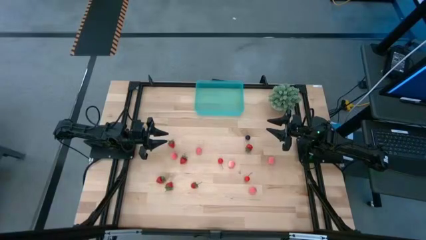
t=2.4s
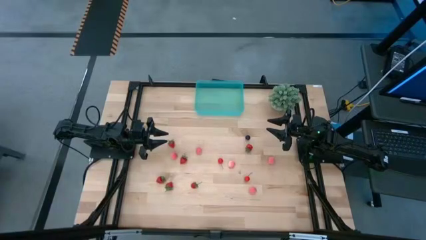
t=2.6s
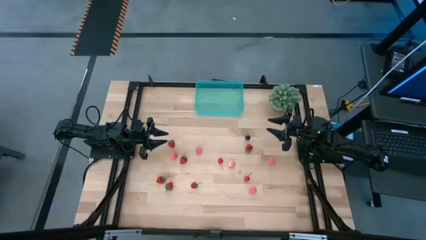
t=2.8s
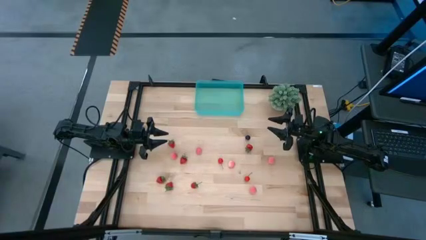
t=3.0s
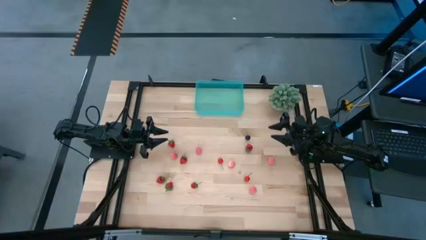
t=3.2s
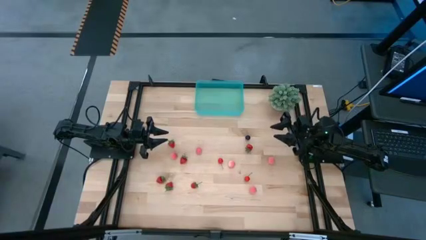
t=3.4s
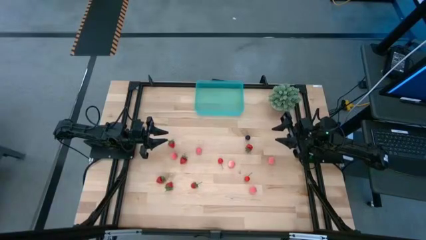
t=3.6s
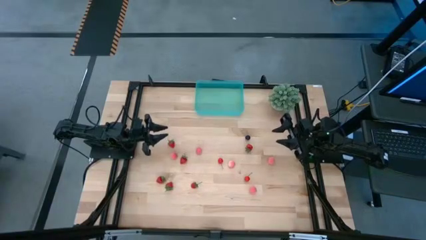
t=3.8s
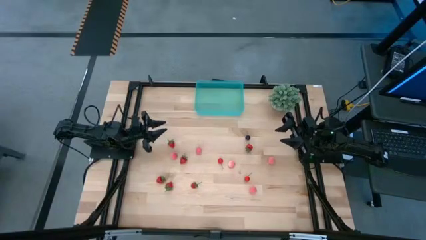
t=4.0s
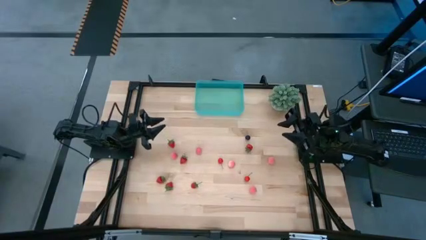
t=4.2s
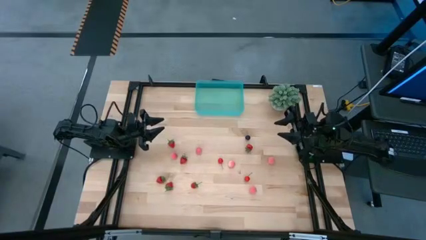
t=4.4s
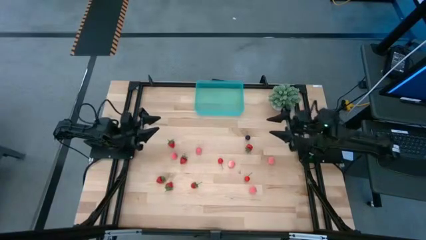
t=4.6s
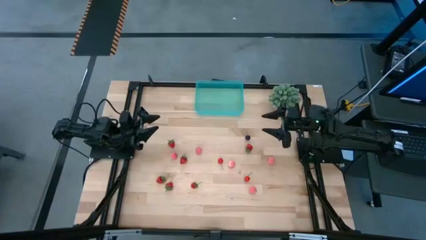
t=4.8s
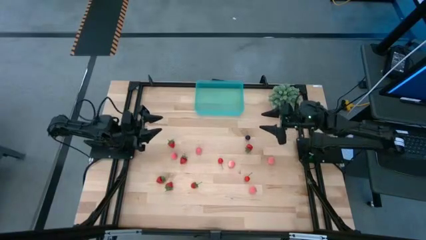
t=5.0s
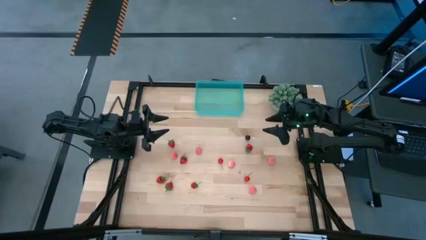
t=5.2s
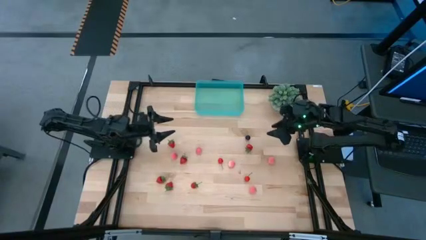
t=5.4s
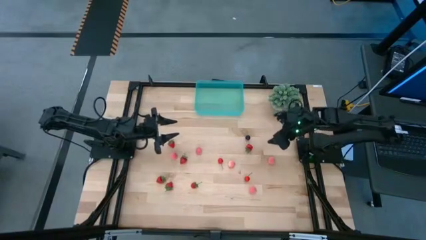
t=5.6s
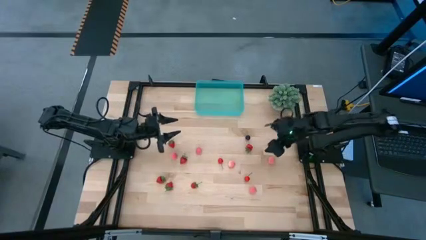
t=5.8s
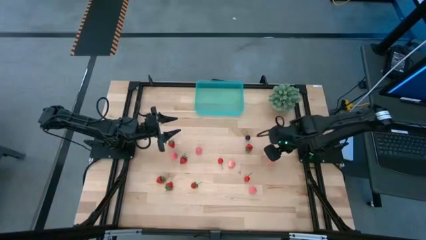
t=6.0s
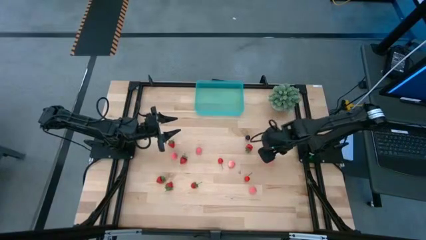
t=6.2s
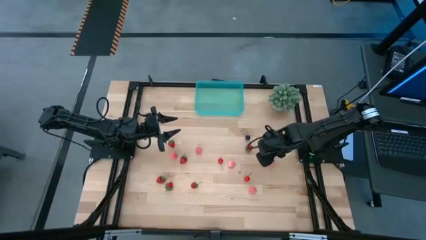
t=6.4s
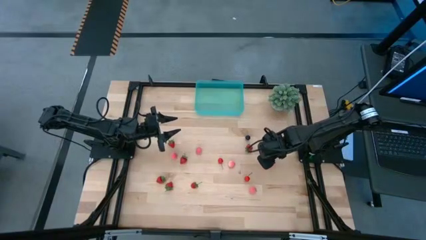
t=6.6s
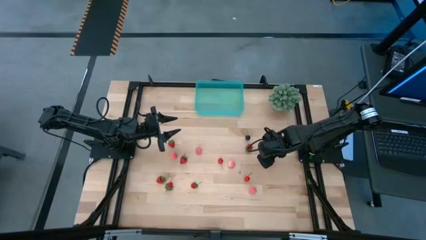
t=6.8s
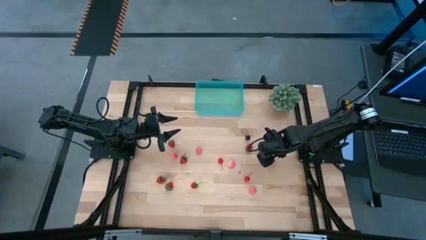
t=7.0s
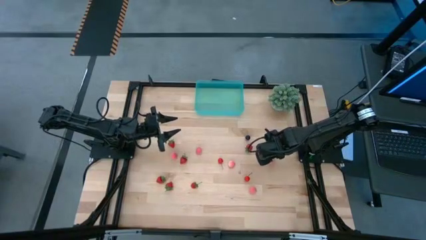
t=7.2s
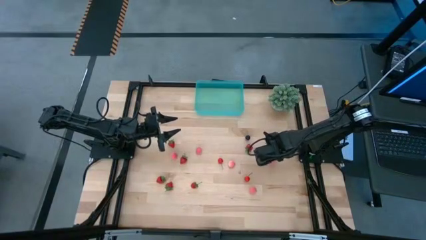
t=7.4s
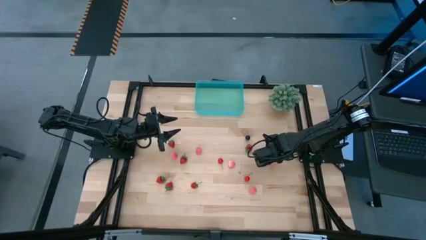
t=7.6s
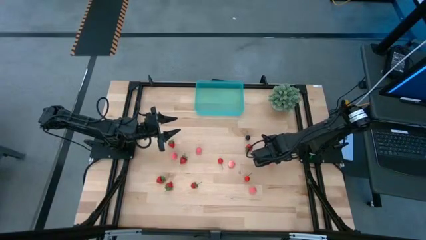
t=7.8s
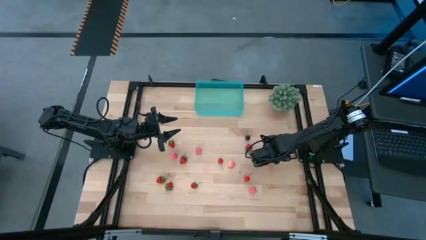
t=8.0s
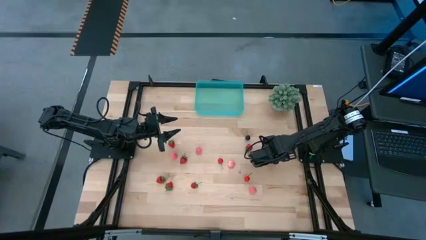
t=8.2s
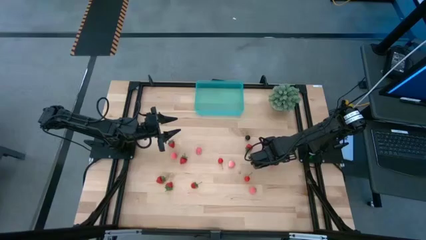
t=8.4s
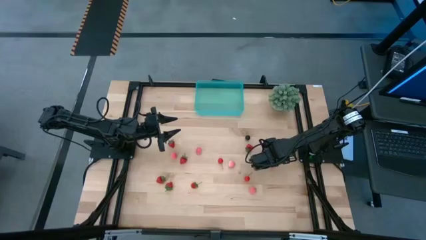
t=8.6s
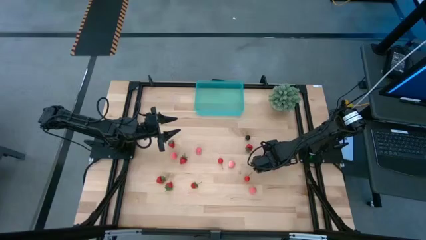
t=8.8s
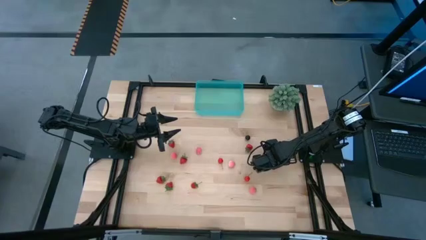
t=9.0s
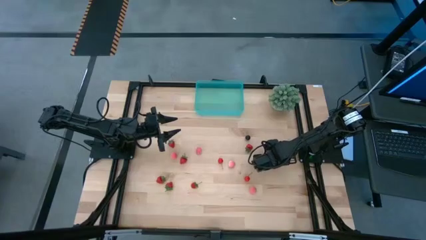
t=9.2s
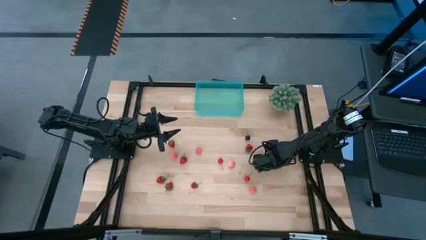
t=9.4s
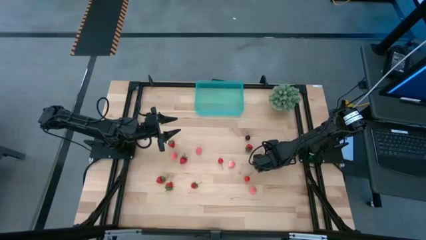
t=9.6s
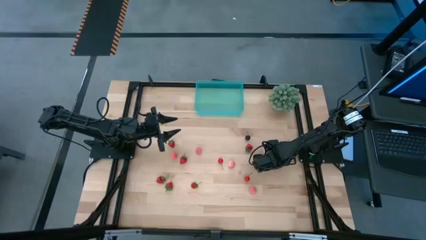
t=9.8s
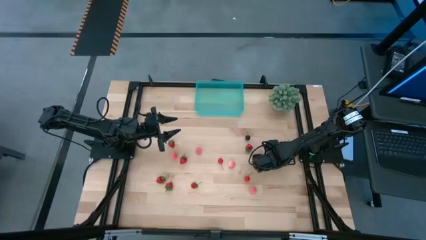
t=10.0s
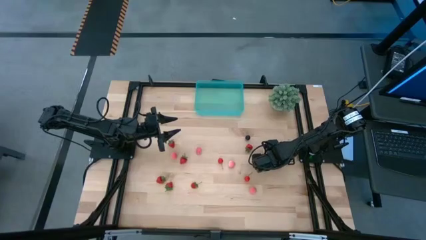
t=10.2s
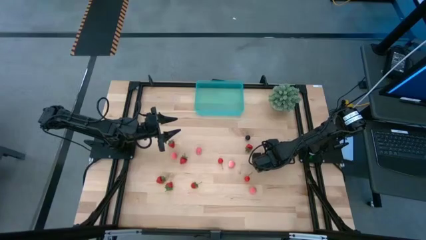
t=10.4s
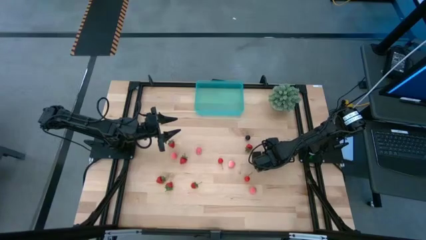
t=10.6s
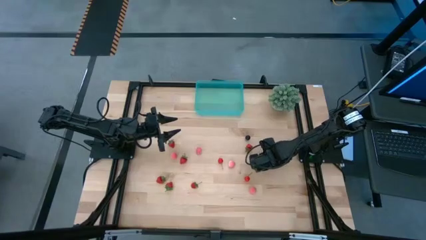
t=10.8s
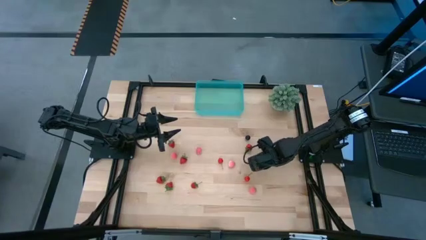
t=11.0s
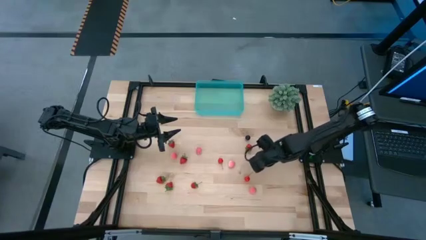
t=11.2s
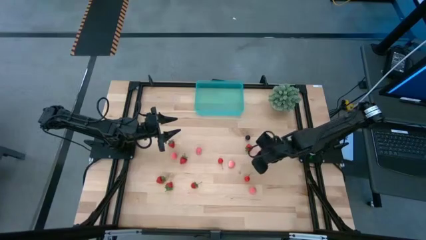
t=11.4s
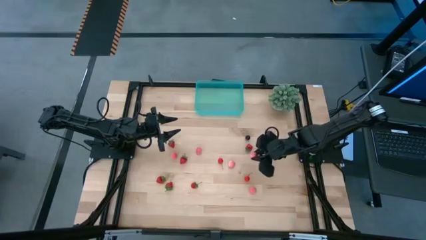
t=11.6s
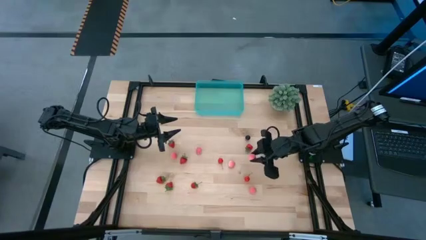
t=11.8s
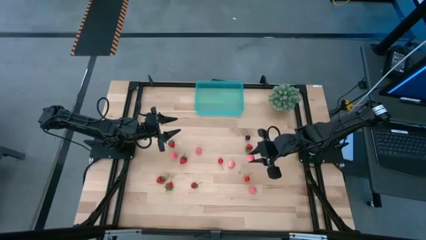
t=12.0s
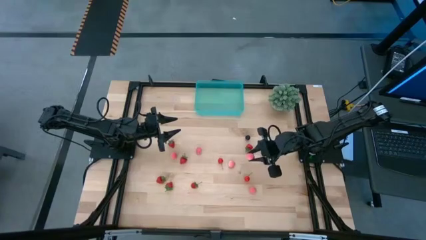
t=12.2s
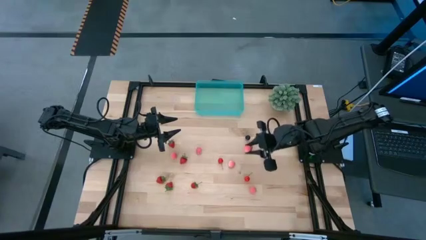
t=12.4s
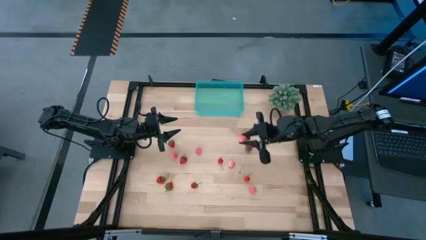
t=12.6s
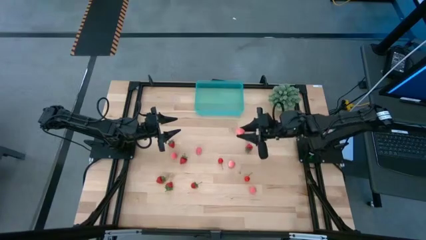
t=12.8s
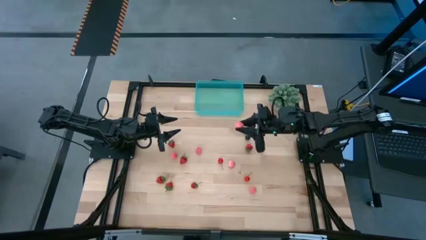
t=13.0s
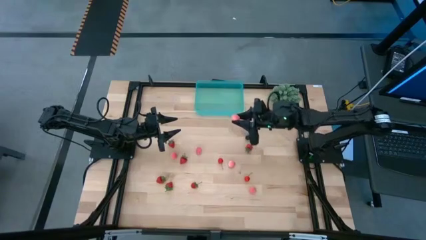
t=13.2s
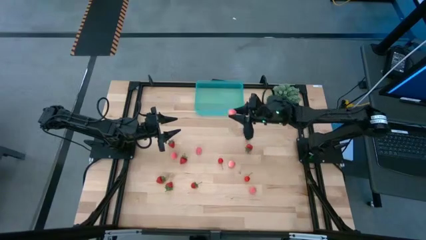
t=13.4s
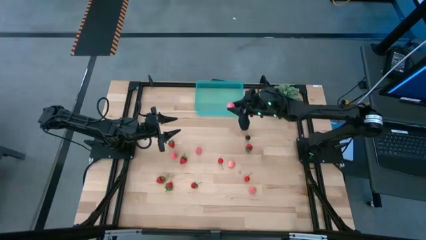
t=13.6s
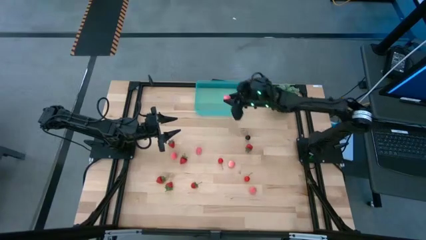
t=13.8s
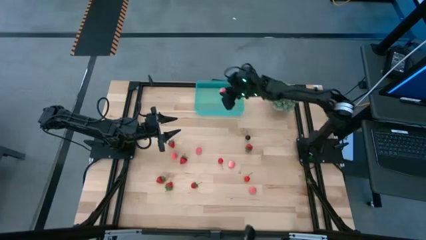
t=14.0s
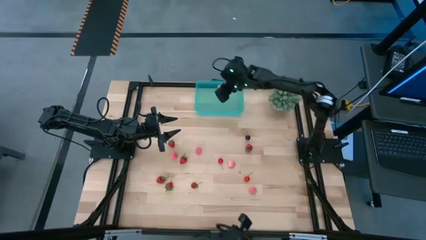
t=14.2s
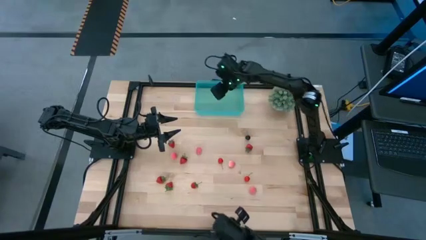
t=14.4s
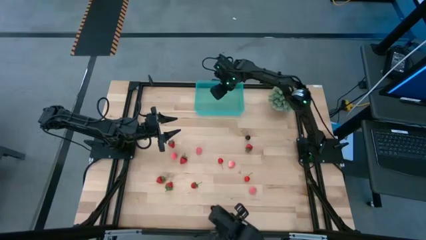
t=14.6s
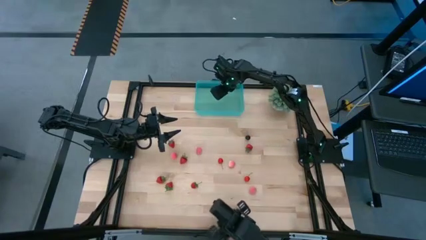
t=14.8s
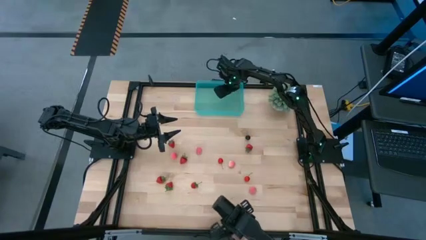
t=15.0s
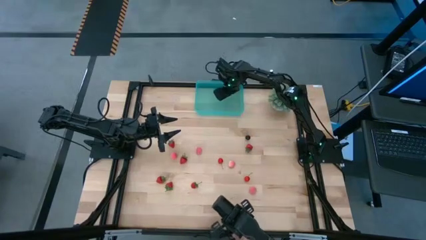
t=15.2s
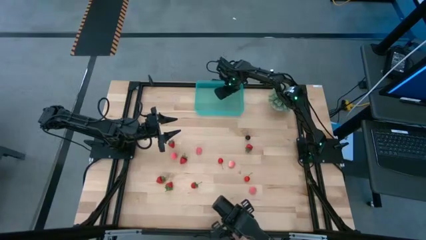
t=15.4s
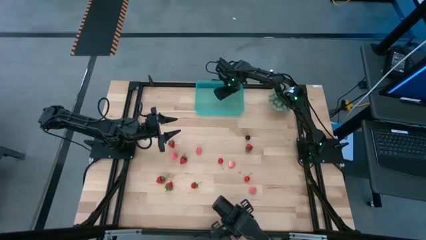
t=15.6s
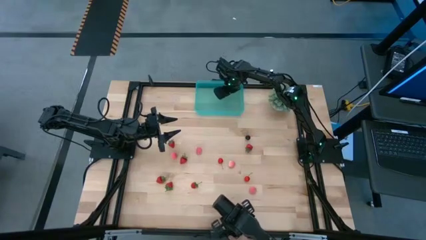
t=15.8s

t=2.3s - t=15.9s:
Task: Pick and placing Produce into tupperware
Put the apricot into the blue basket
